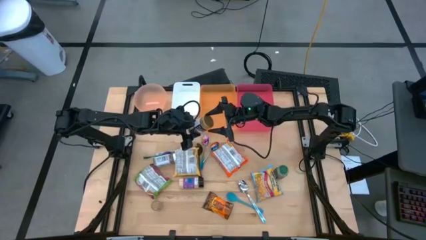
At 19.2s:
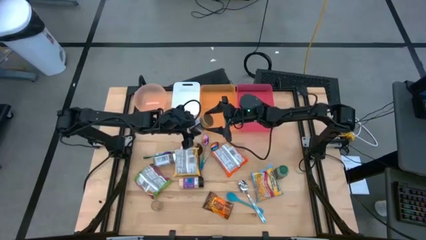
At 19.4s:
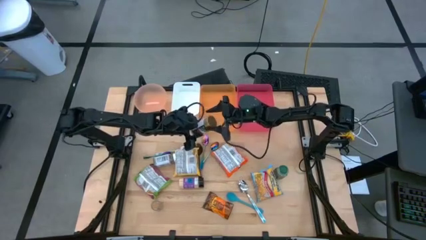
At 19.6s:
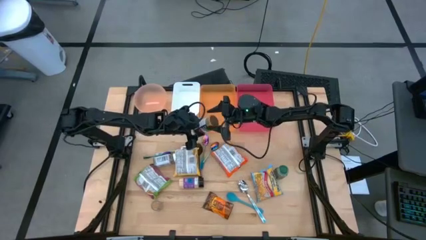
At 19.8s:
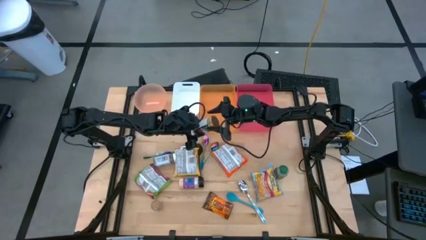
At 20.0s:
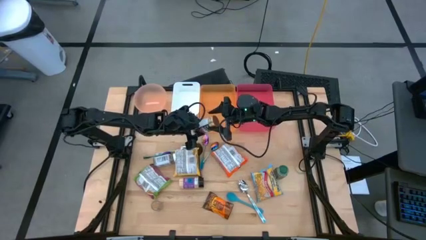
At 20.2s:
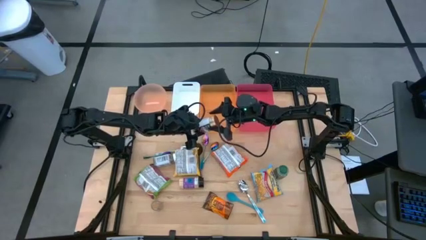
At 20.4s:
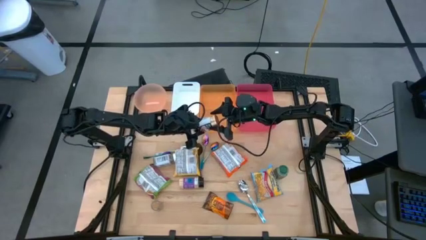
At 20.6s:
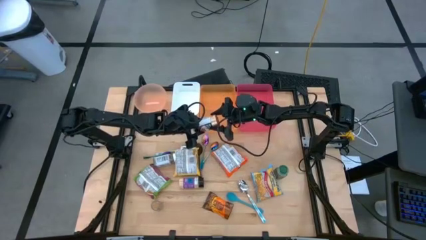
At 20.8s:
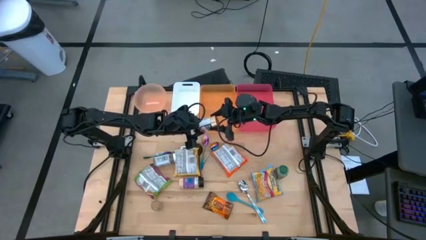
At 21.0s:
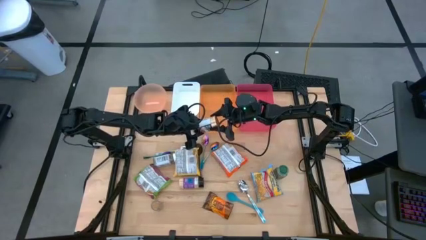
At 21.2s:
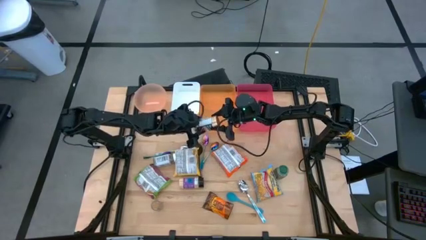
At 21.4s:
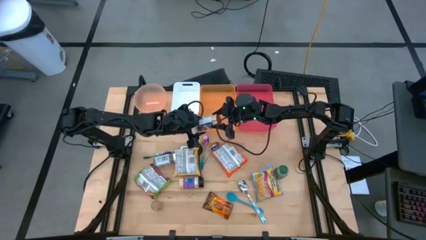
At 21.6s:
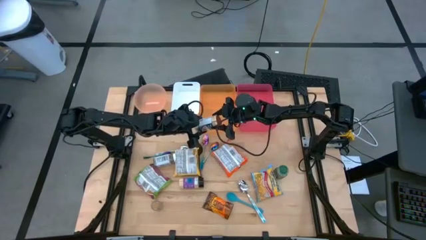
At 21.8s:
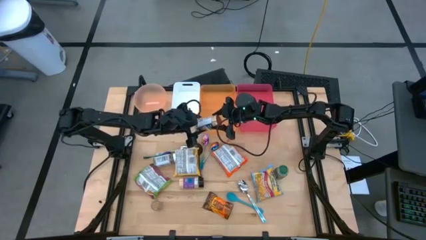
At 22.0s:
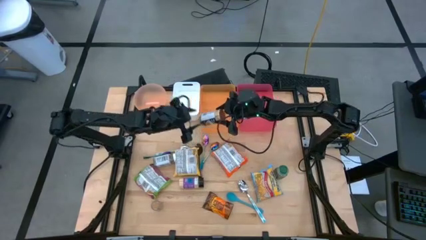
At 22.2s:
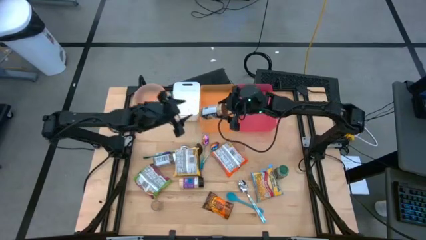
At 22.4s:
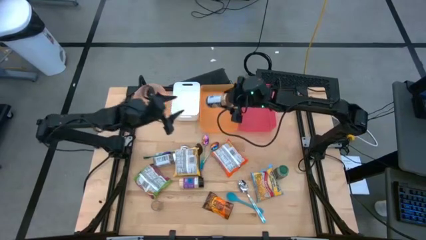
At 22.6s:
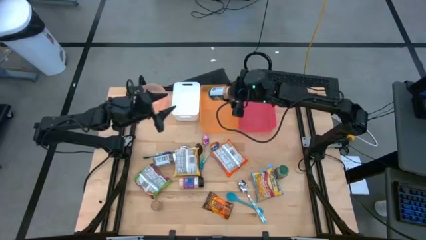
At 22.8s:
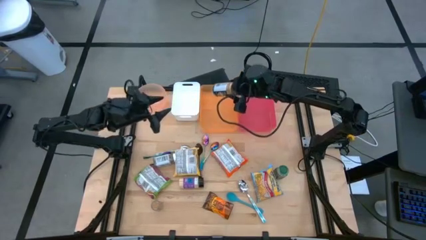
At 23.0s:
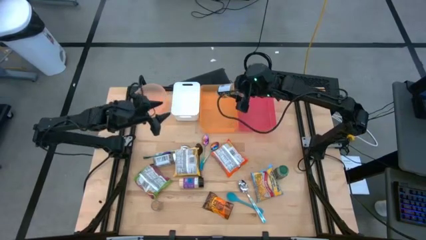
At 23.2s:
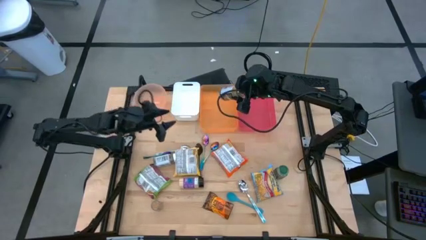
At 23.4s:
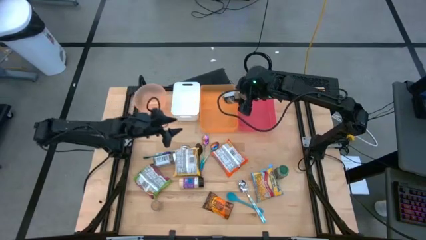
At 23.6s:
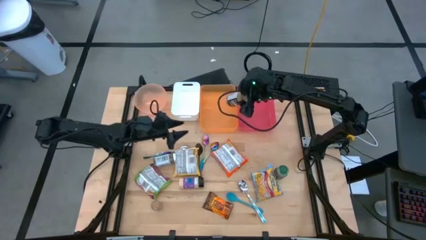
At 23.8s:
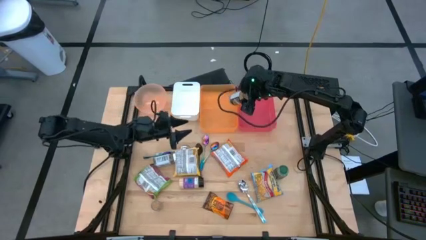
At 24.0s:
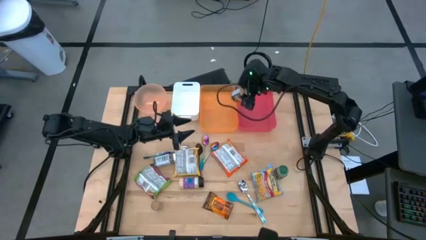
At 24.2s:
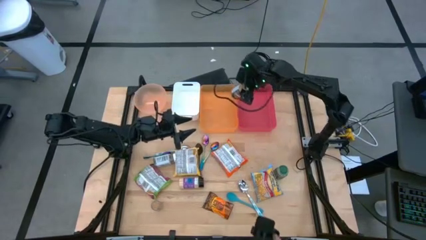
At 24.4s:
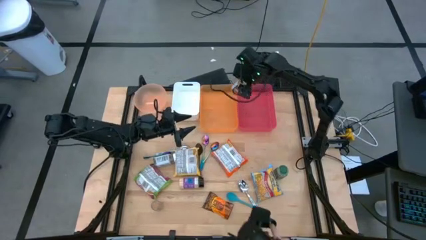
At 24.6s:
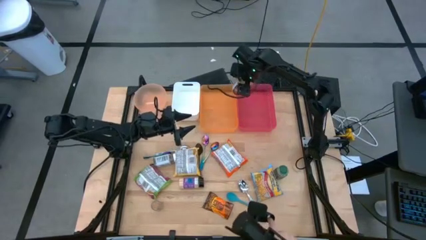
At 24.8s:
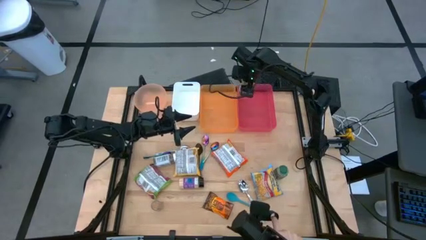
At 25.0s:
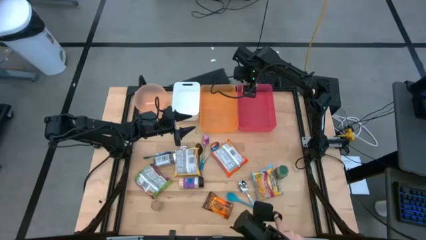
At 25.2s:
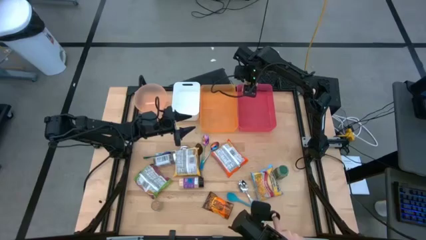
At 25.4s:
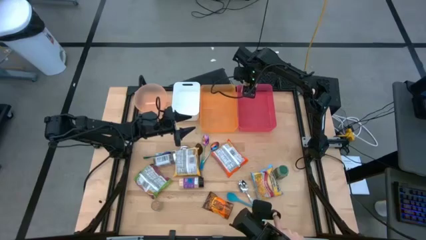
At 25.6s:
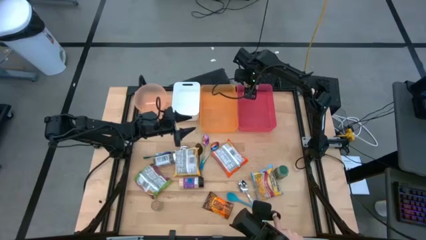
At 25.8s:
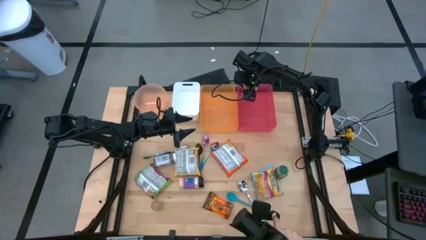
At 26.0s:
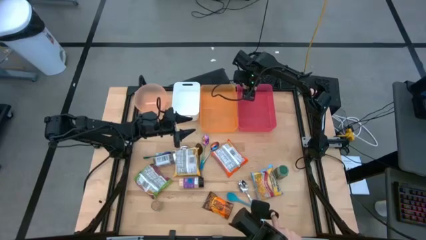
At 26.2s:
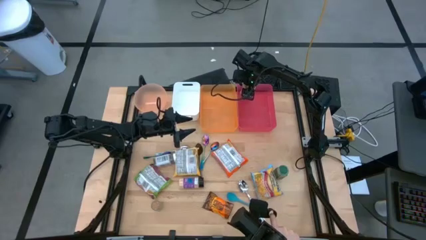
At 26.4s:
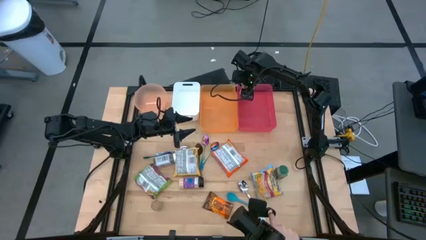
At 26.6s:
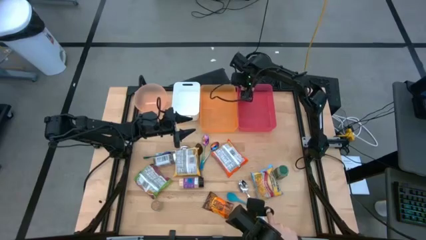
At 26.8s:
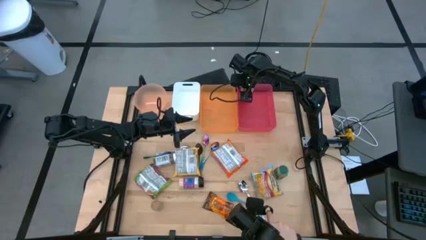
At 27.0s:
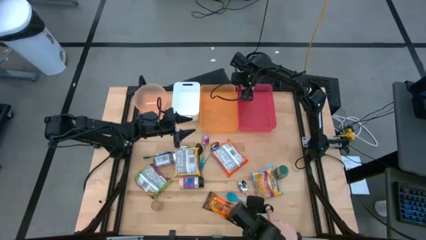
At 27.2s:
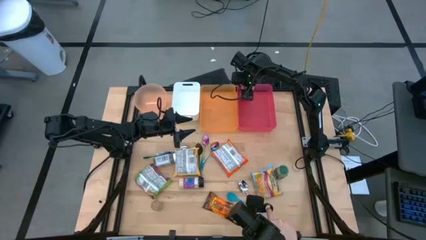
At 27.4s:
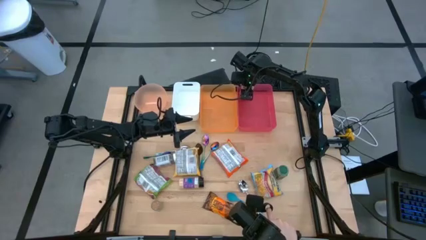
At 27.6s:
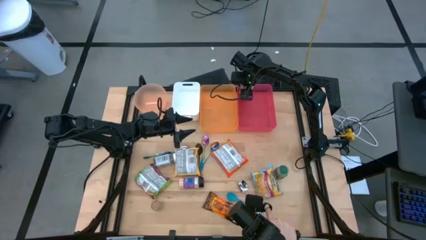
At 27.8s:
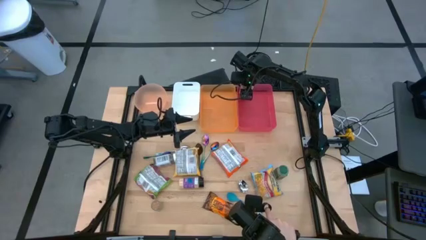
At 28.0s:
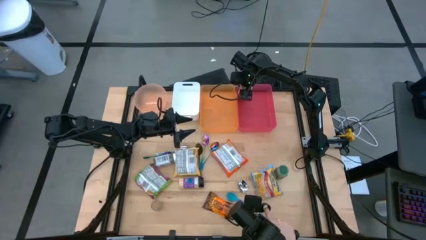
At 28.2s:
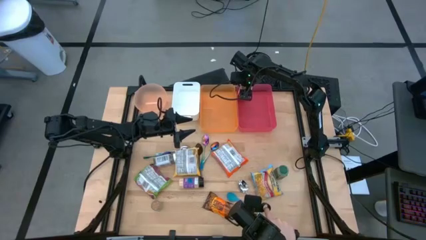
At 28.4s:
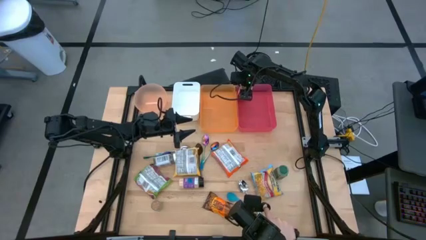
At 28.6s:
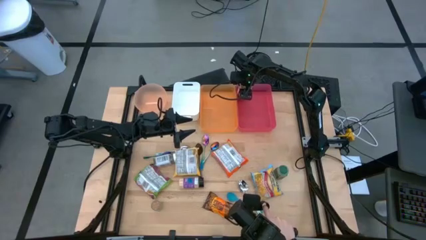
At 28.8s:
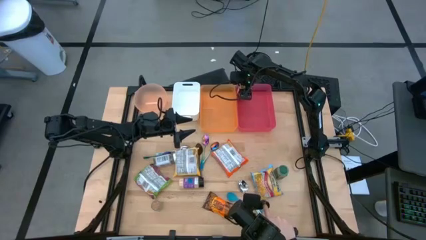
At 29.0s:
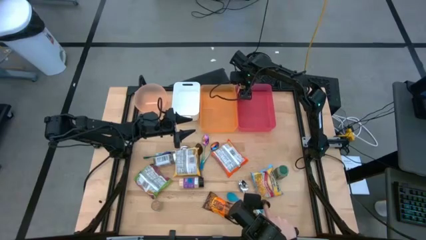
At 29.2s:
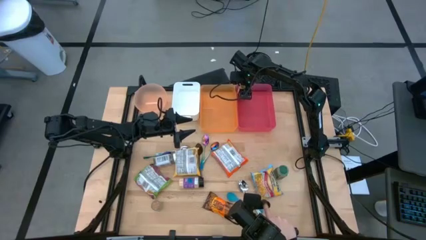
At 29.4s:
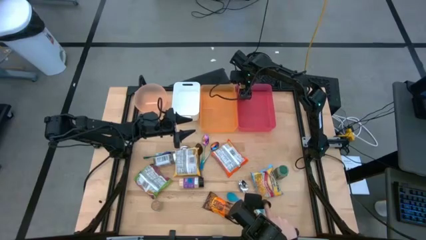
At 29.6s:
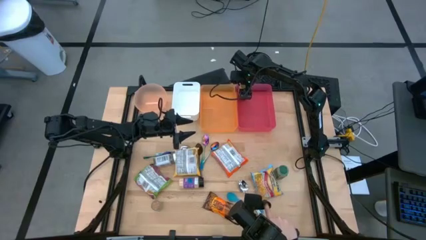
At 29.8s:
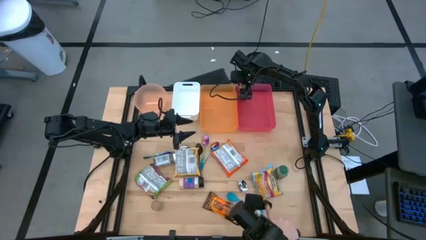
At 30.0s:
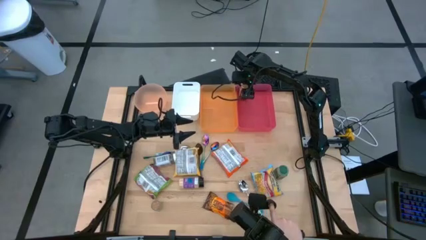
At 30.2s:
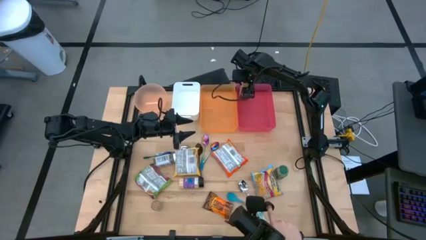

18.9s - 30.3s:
Task: Pick & Place Food Item
Put the golden seasoning bottle into the red bin

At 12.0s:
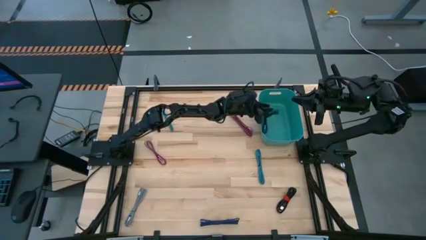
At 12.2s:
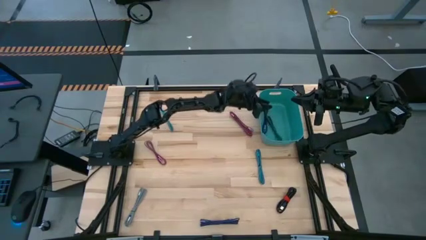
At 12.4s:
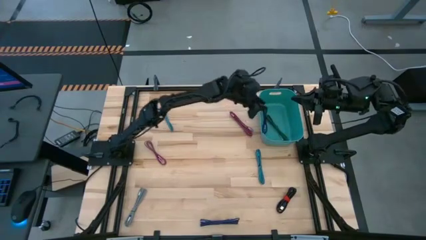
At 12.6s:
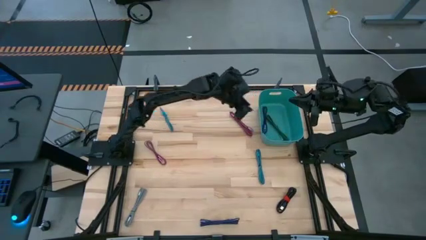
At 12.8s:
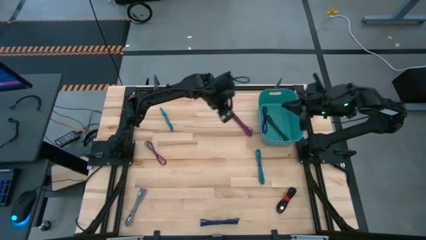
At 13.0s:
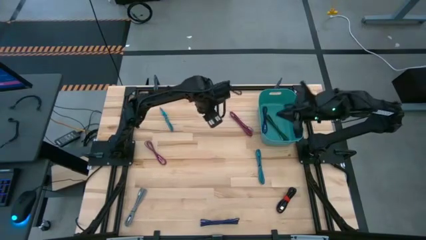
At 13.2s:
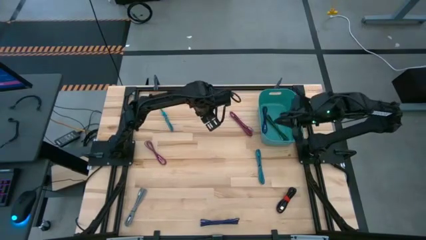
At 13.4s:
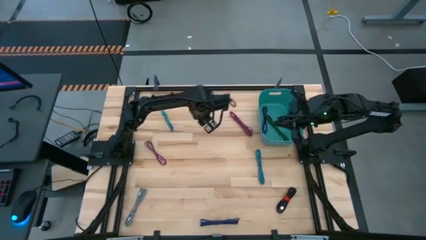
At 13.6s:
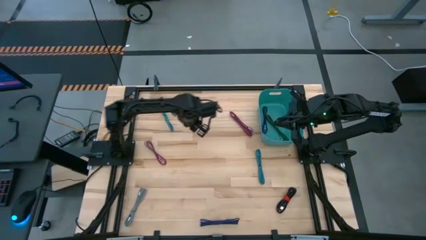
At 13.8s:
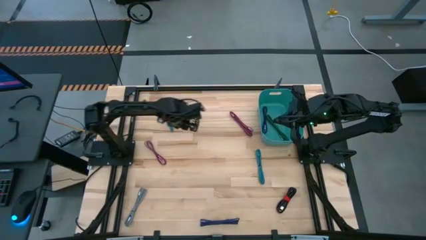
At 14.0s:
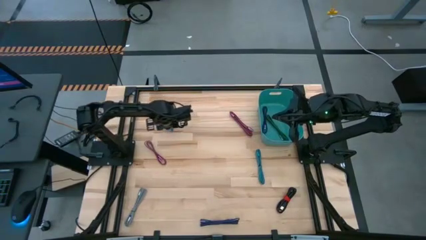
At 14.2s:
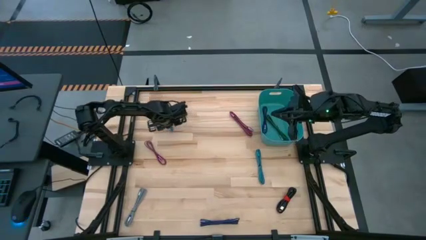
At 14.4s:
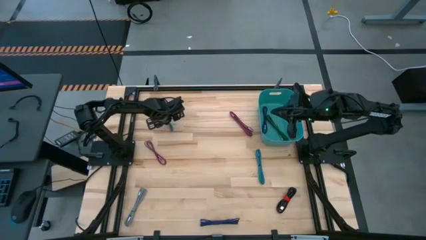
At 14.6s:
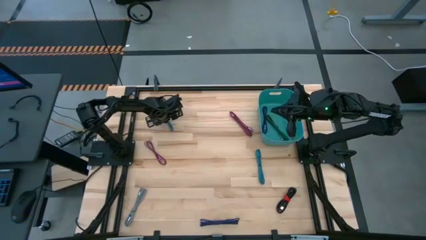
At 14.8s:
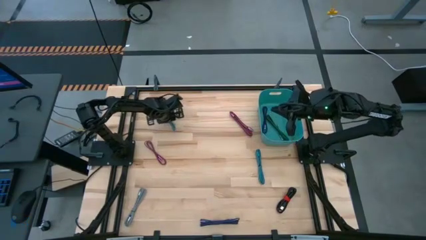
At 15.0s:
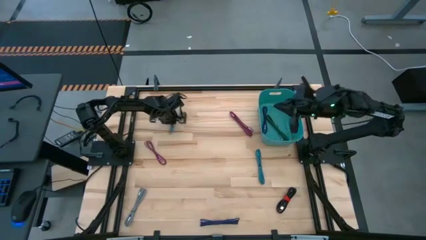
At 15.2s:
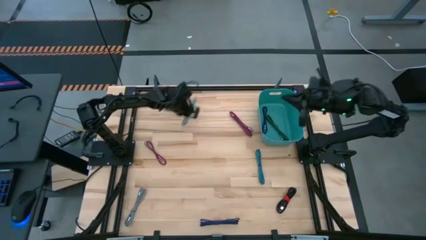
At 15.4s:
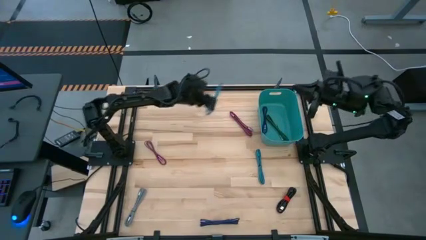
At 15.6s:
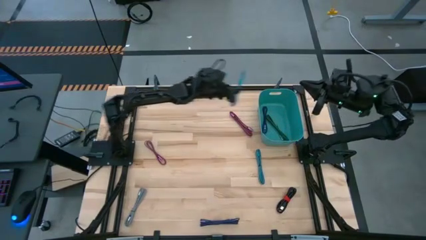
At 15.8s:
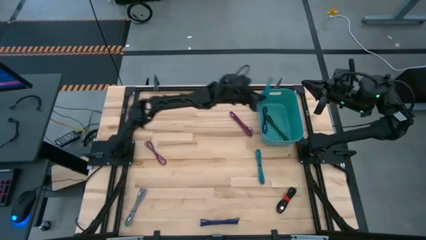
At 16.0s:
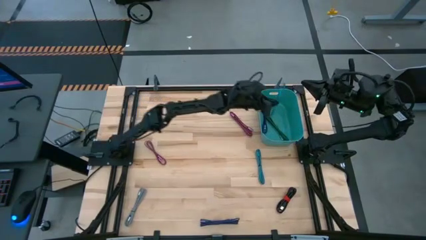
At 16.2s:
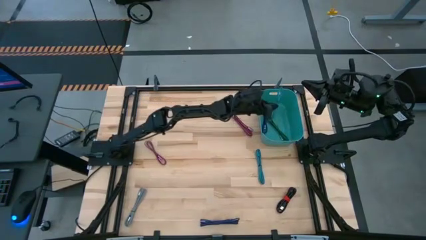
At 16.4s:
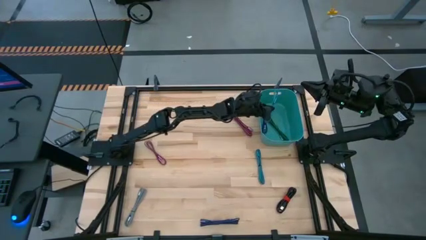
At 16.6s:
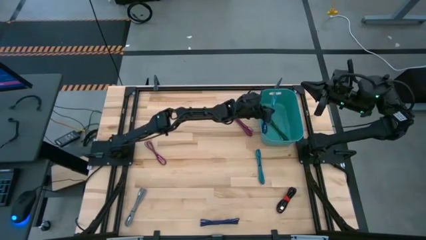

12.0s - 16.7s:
Task: Pick and place USB-C Cables
Put the left green charger cable into the green bin
